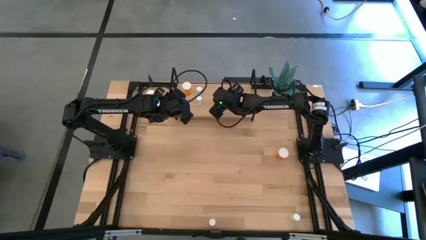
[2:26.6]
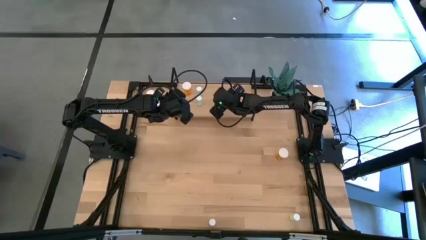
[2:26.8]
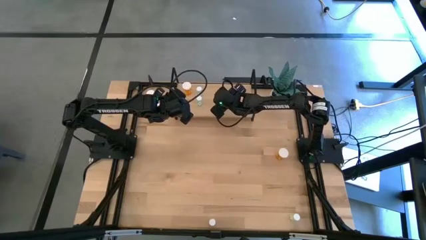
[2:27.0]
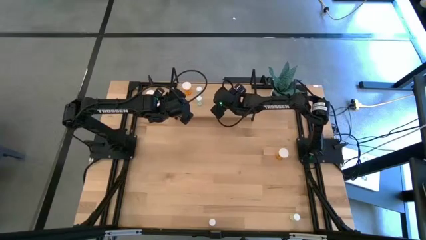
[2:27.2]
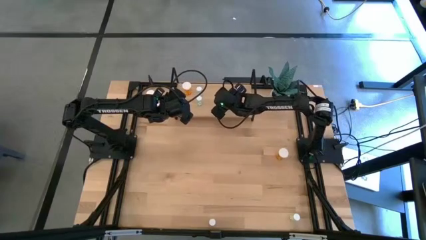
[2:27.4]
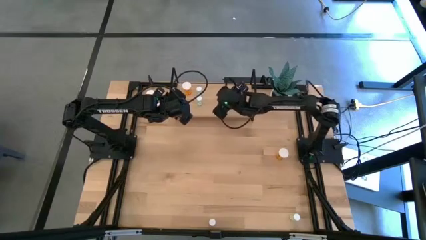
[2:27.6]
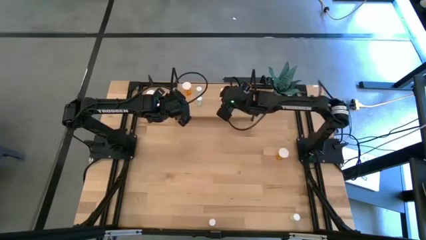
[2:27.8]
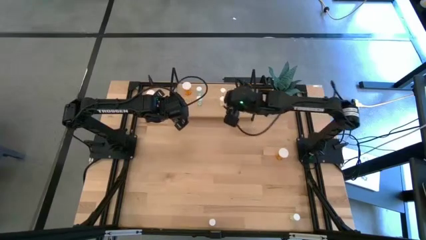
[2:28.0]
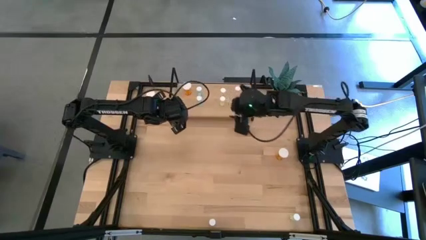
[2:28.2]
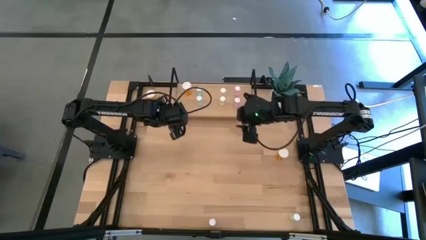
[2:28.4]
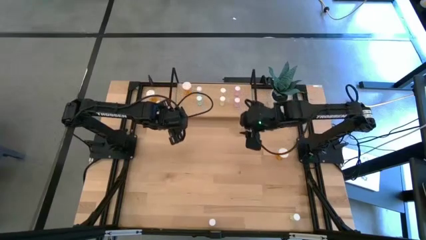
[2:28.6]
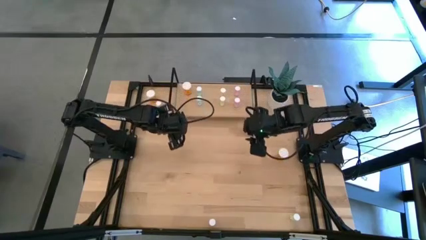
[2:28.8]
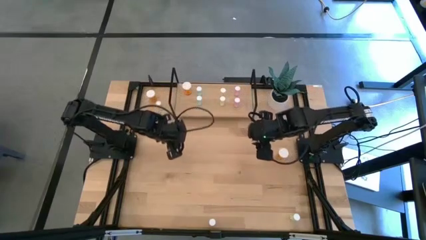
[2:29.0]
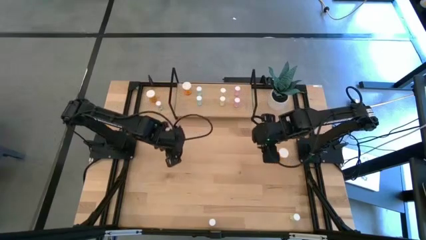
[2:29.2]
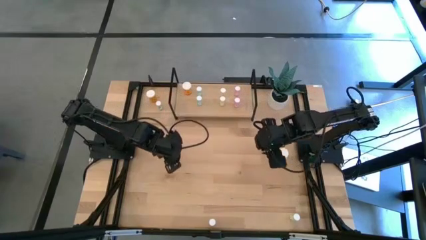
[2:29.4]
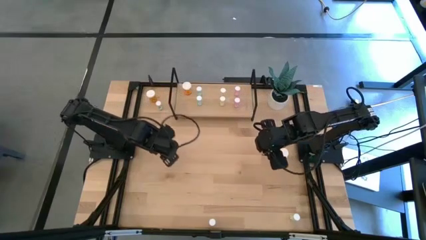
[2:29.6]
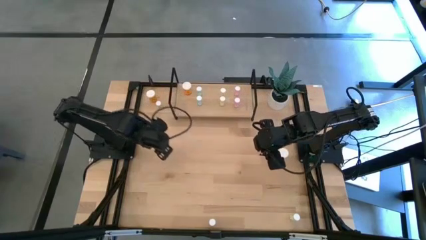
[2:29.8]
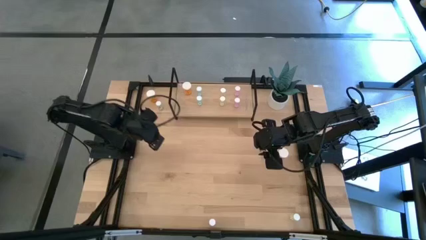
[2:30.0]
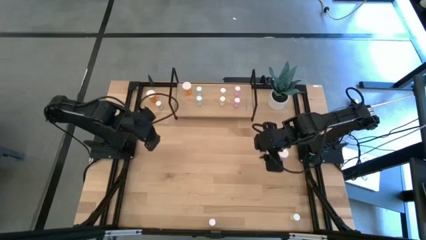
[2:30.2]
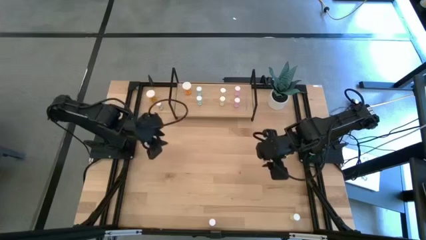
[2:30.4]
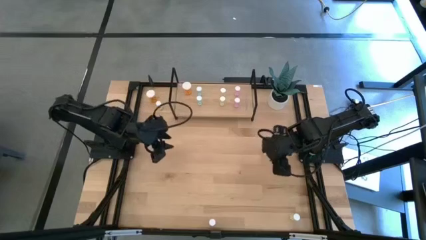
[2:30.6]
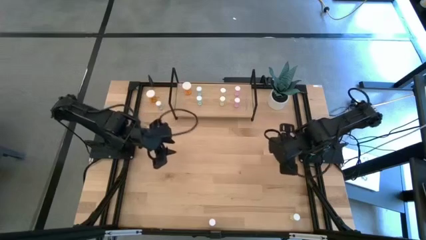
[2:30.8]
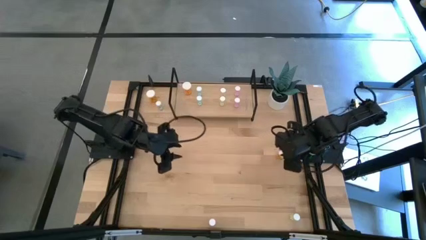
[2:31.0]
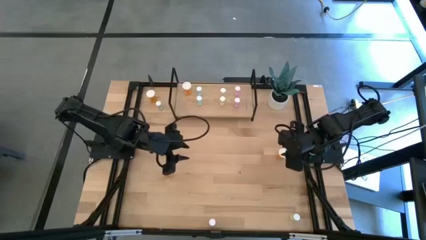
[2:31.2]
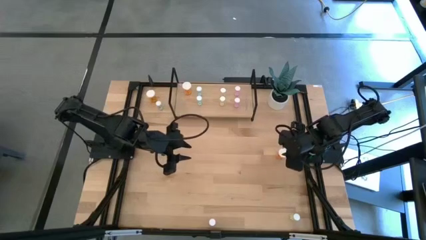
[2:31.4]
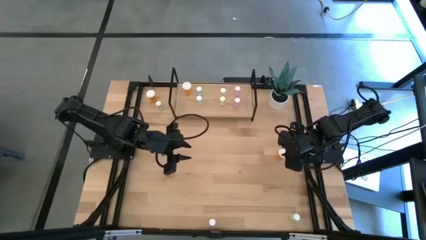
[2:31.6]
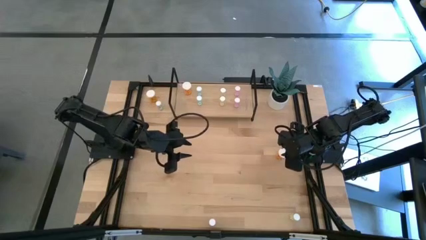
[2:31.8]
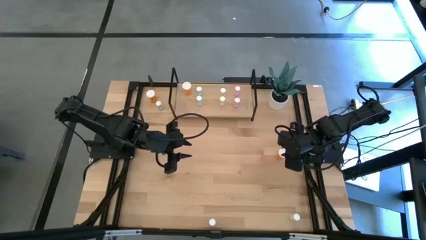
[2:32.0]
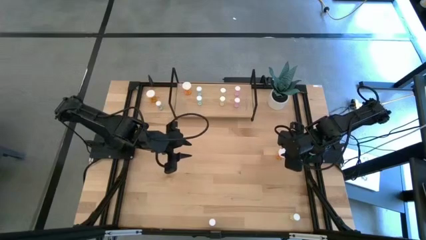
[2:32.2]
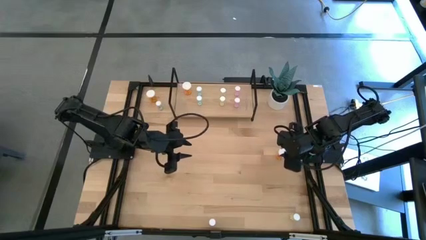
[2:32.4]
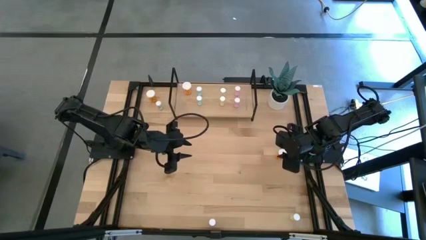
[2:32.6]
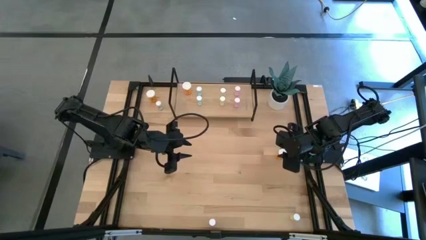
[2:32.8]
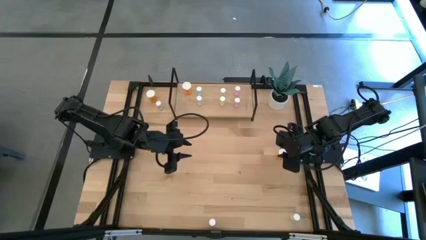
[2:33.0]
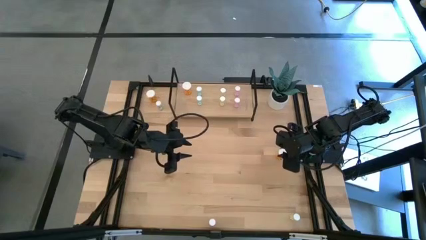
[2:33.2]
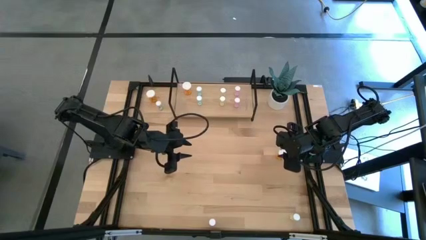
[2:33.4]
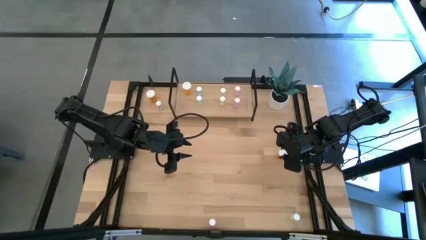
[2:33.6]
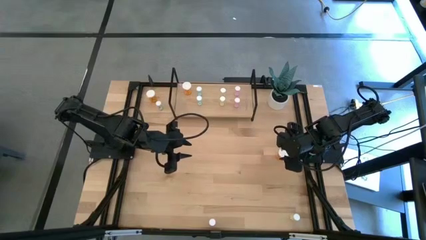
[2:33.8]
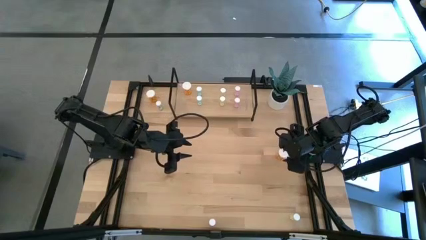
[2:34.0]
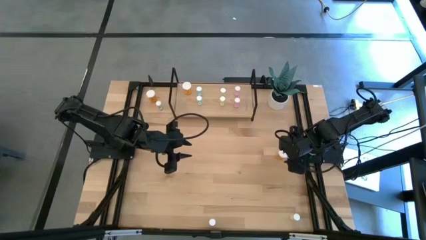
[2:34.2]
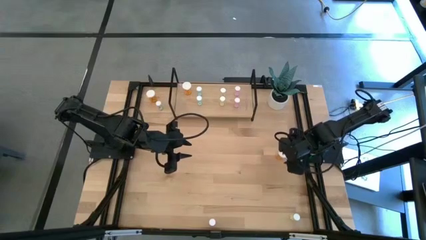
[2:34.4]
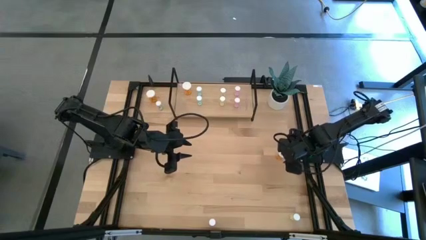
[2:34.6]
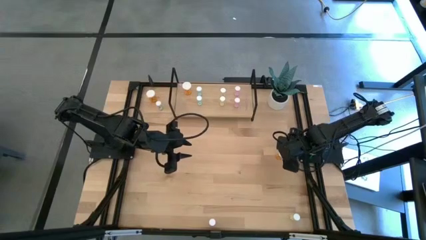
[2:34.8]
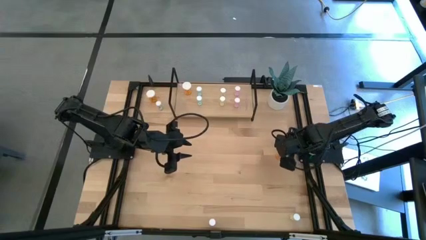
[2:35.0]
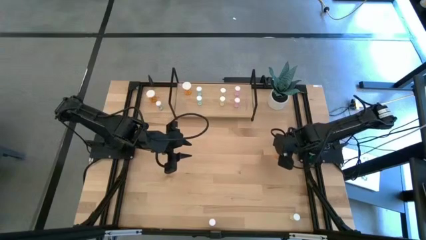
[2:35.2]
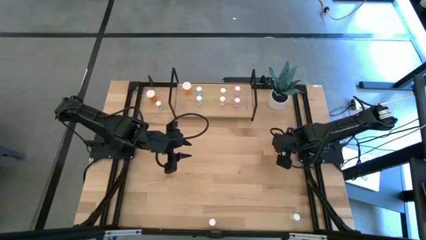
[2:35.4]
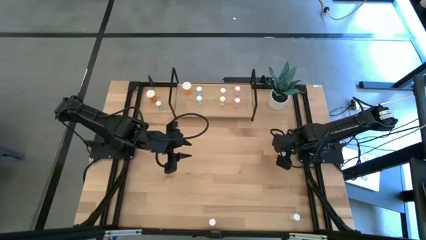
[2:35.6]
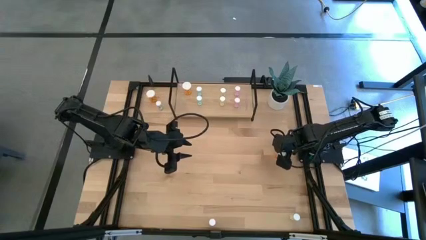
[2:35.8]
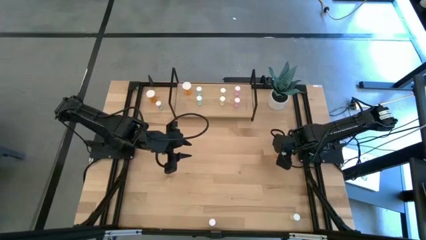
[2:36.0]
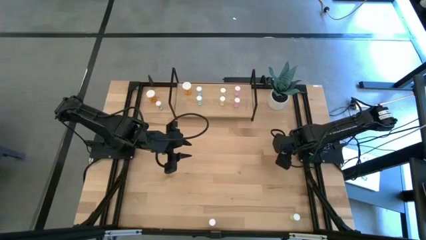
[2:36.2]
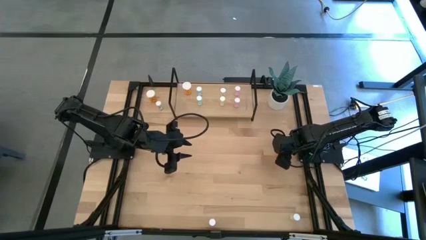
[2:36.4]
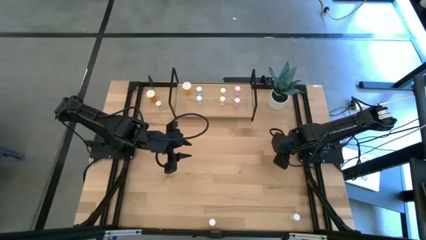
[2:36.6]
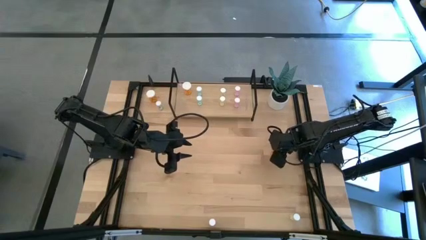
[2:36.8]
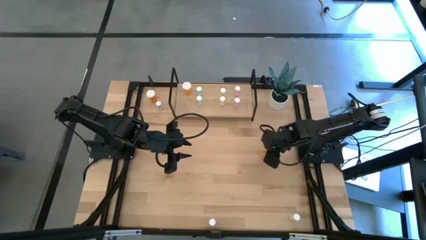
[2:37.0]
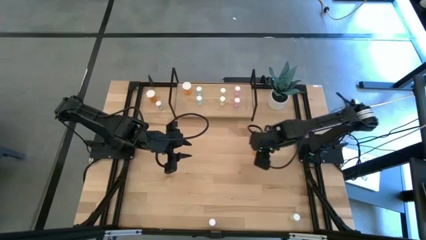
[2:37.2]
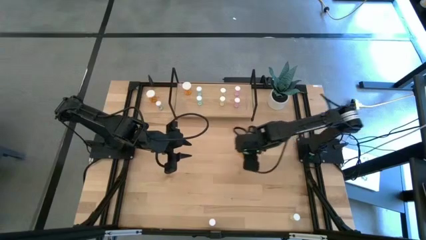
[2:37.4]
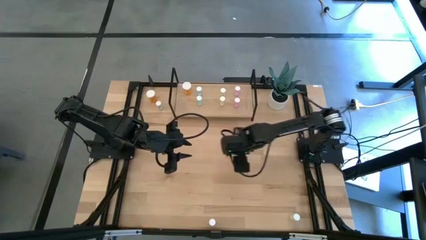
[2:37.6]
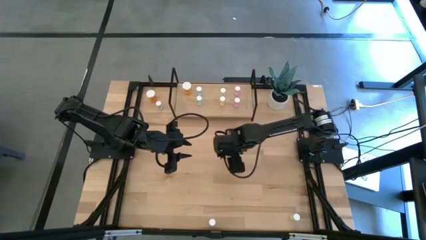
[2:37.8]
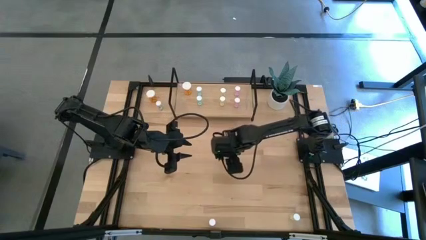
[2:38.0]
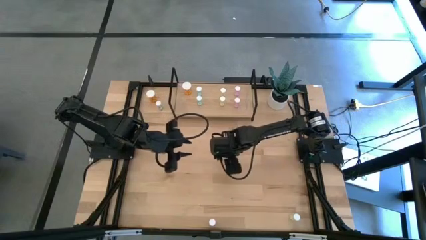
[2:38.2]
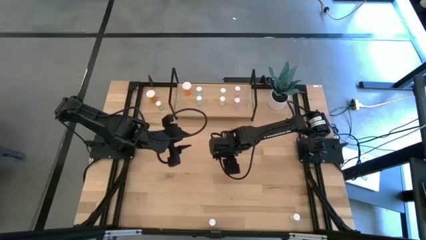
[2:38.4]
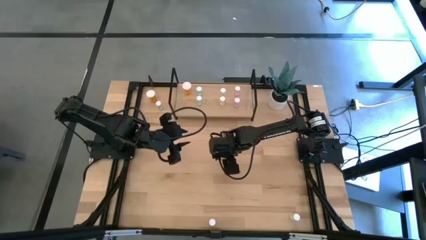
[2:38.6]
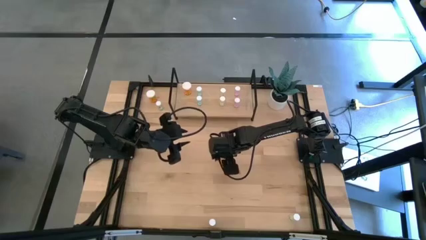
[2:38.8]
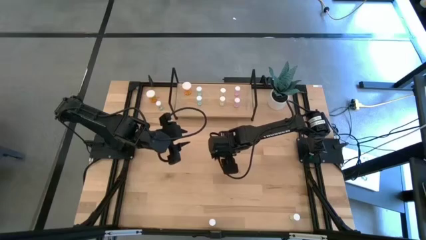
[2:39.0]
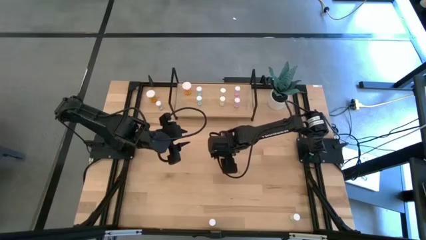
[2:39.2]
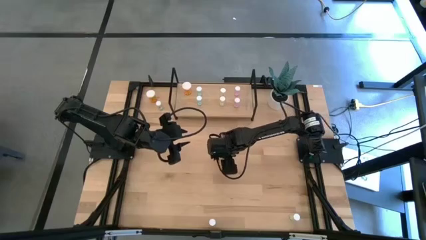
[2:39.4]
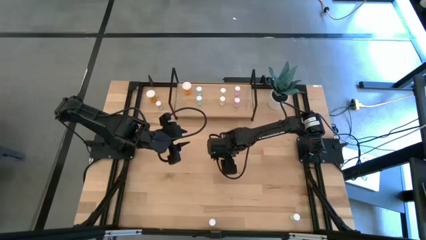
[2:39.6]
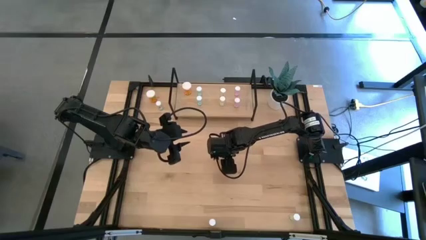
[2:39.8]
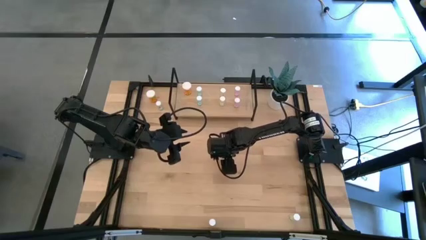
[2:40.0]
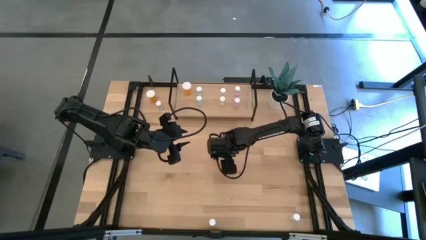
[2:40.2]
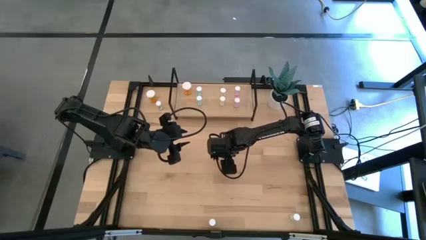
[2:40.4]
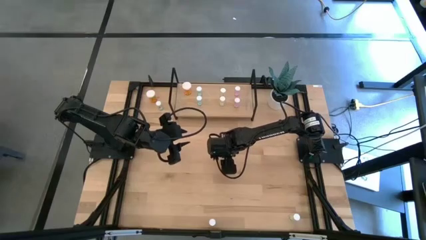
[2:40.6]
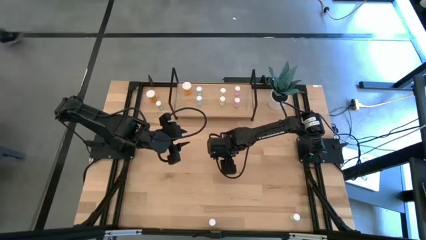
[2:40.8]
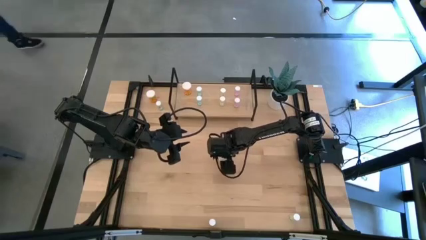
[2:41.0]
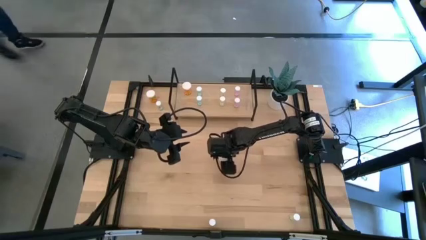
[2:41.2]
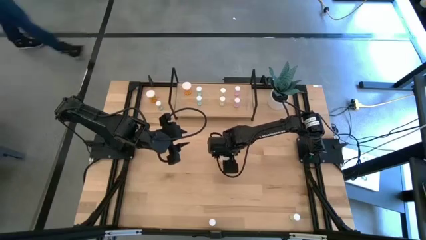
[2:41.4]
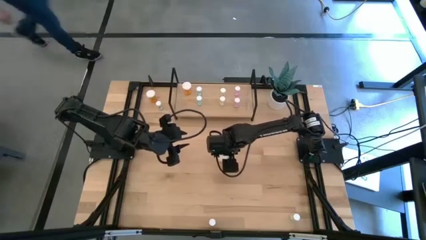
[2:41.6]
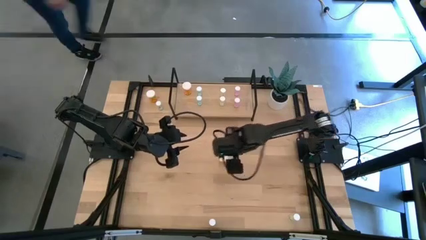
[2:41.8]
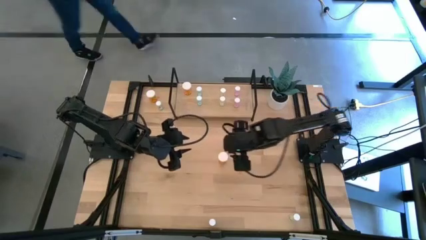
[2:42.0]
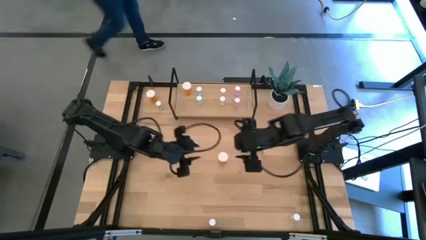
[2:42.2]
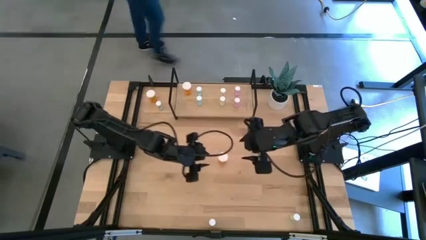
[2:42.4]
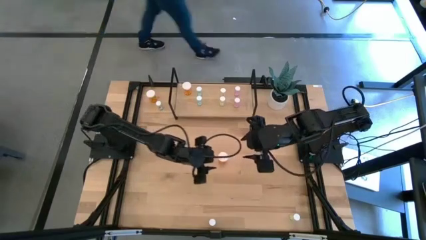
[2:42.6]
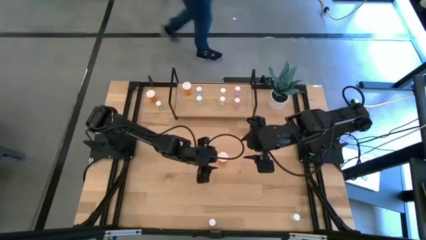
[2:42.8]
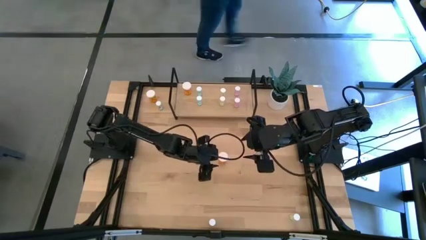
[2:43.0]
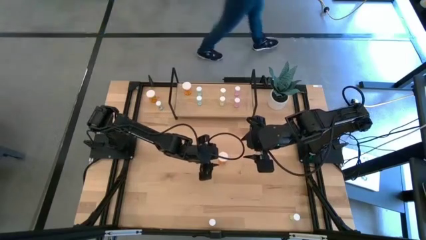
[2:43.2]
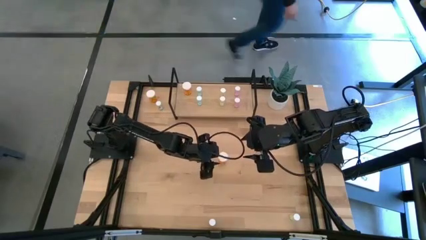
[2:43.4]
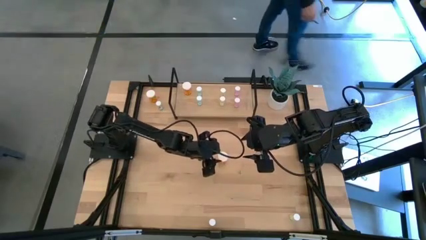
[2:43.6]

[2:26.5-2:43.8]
Task: Pick and place medicine bottles onto shelf by color
Put the right orange pill bottle on the shelf aligned with the other orange pill bottle
